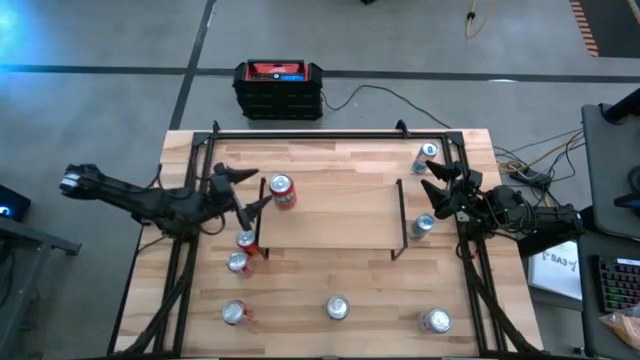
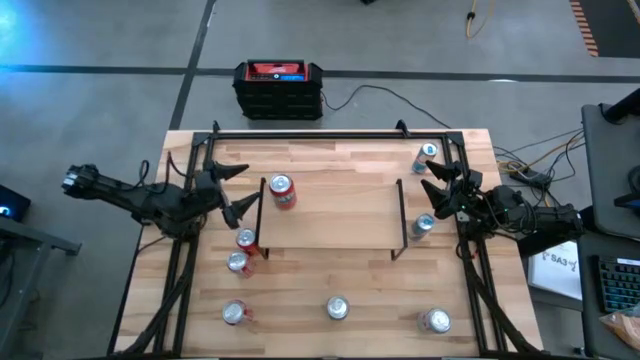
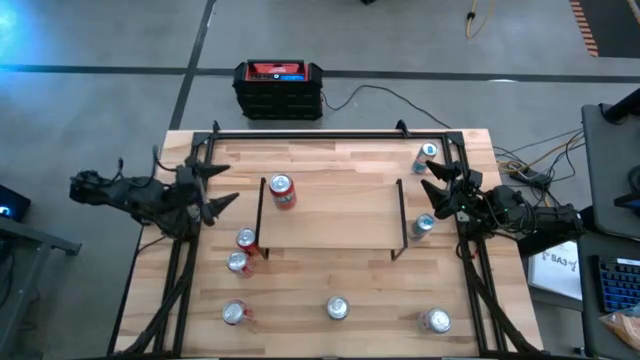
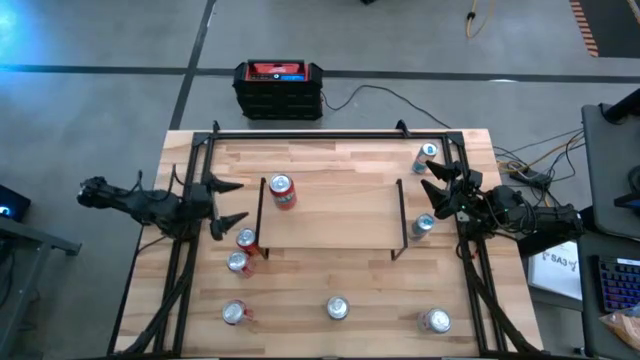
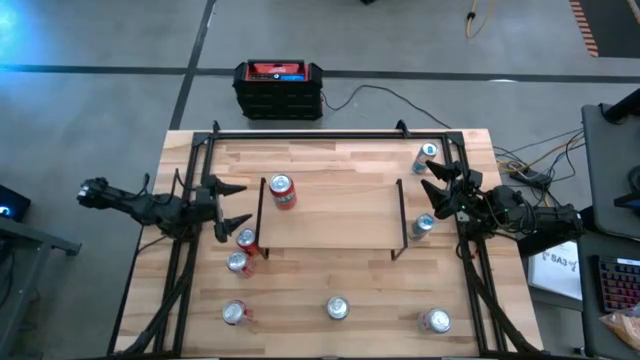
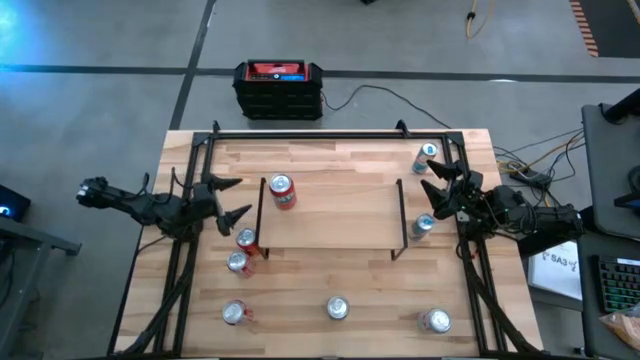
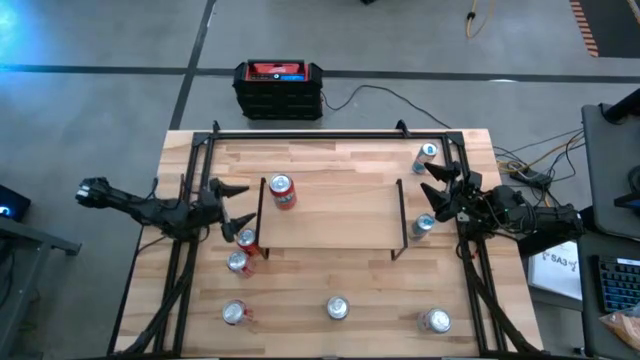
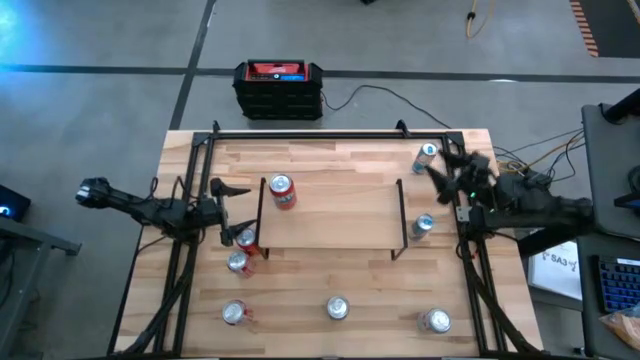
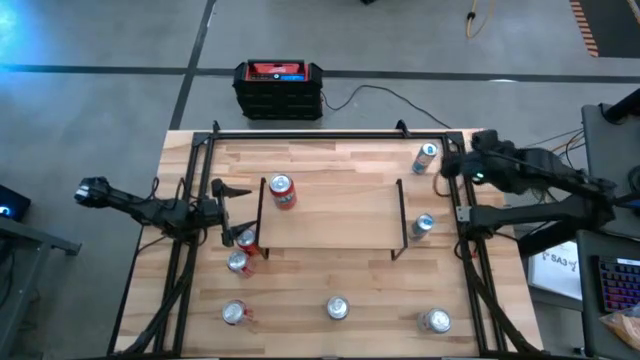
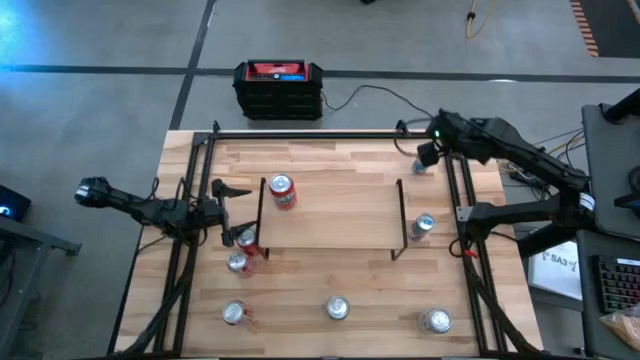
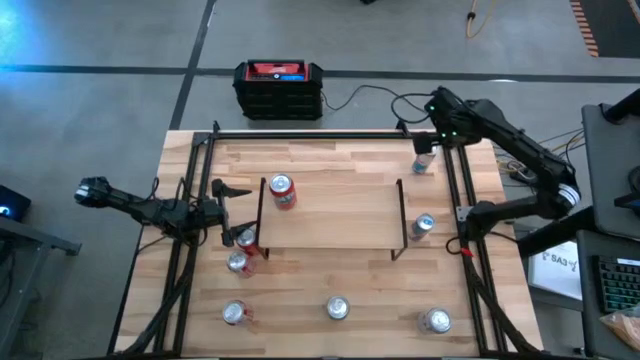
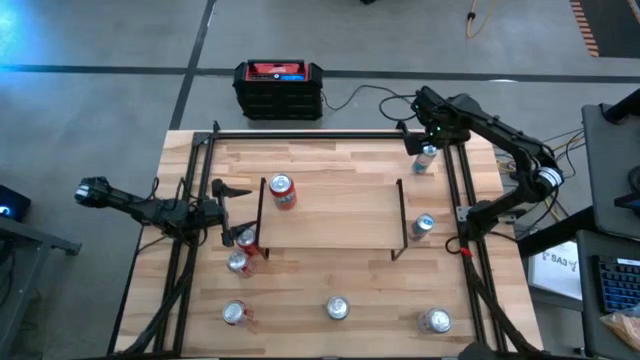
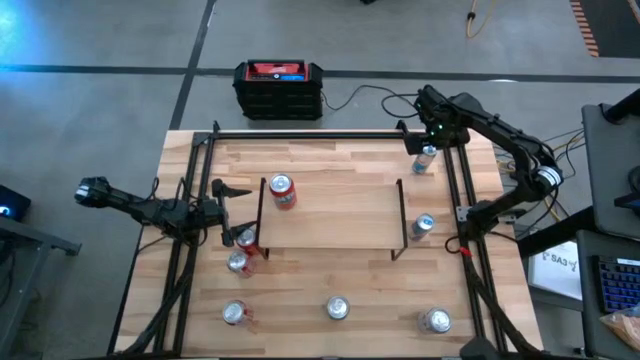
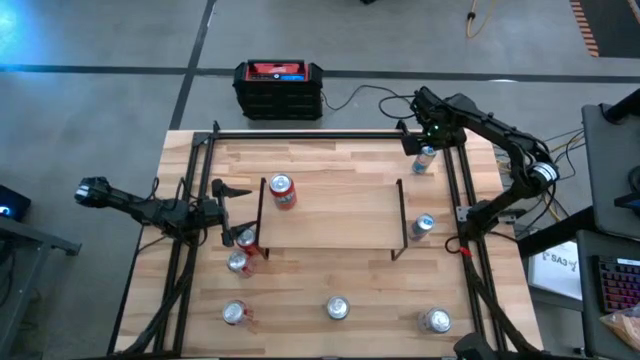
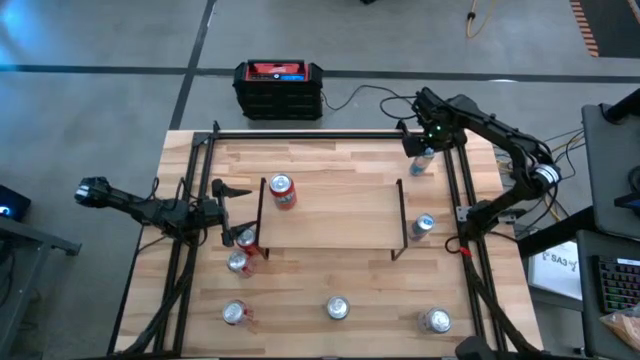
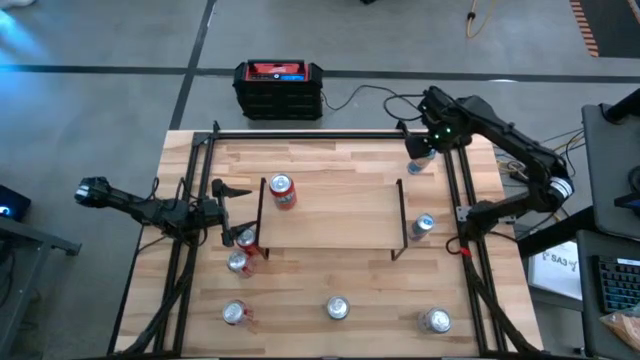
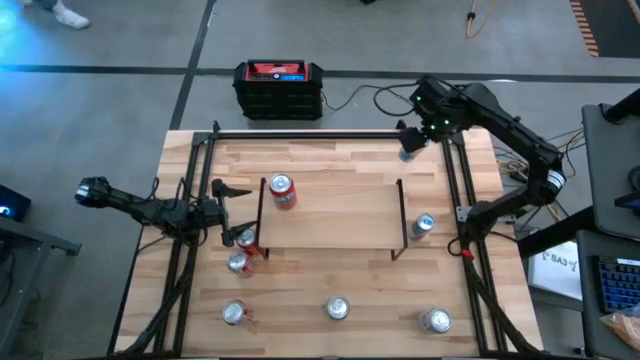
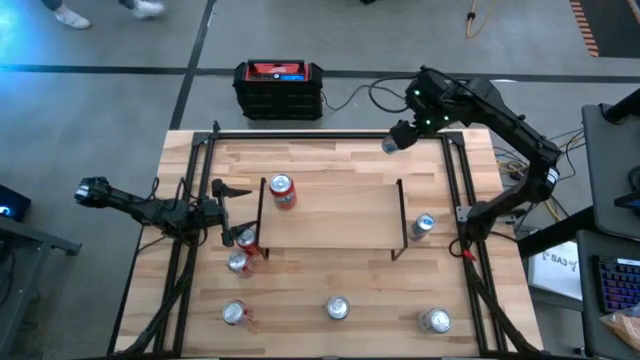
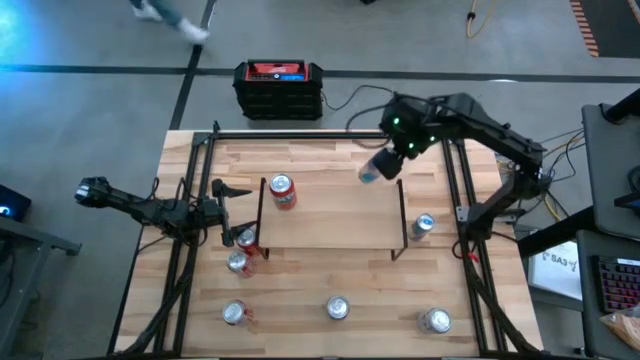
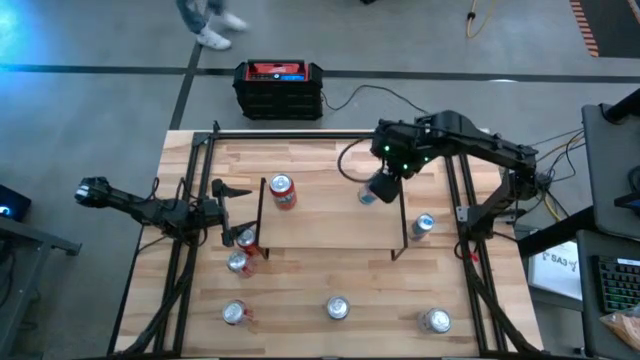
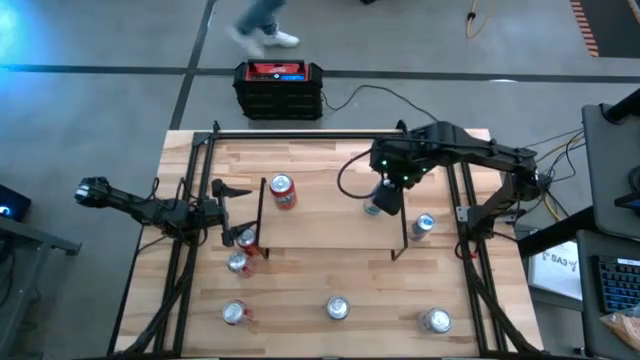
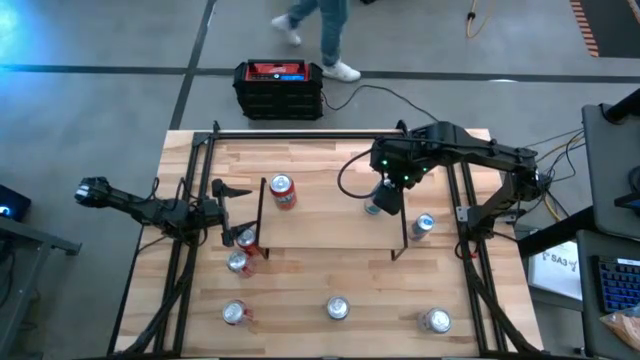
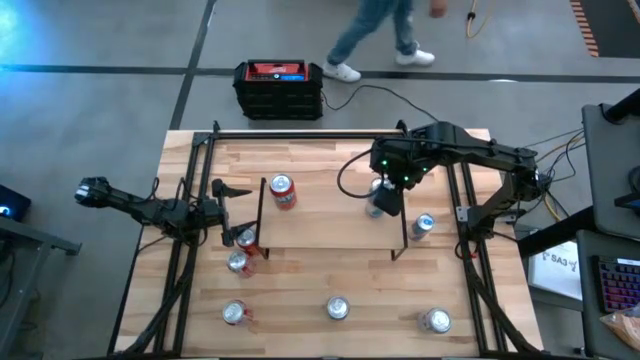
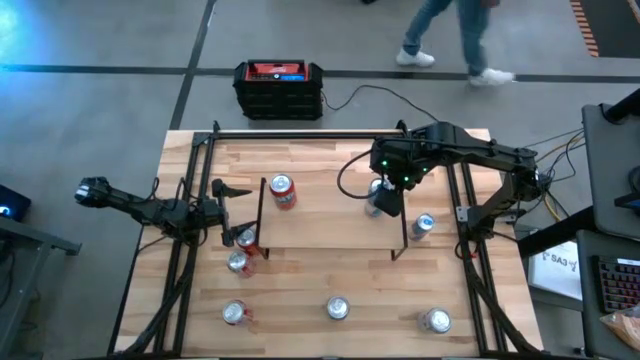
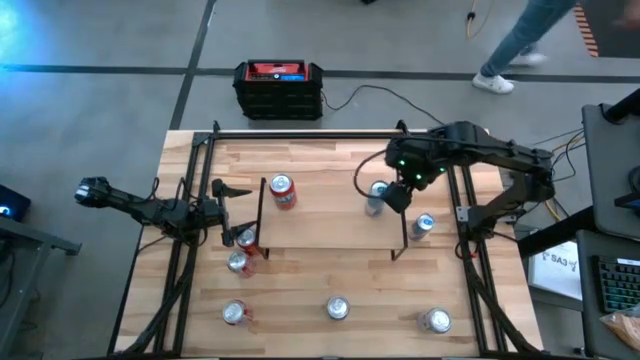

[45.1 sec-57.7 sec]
Task: Place canned beverage on shelf
Put the top blue soda can on the shelf

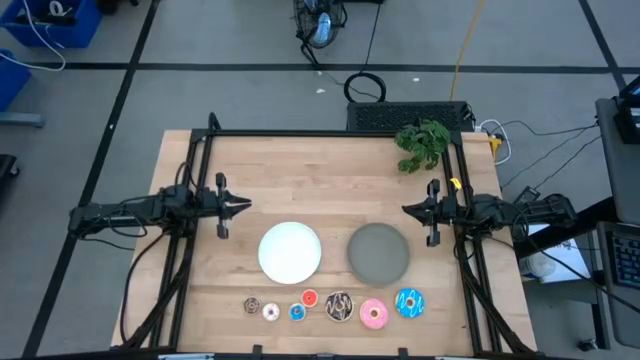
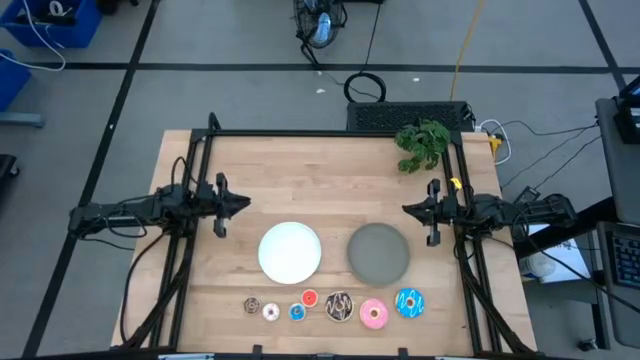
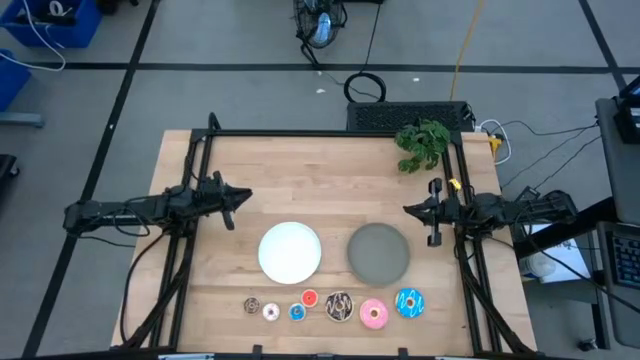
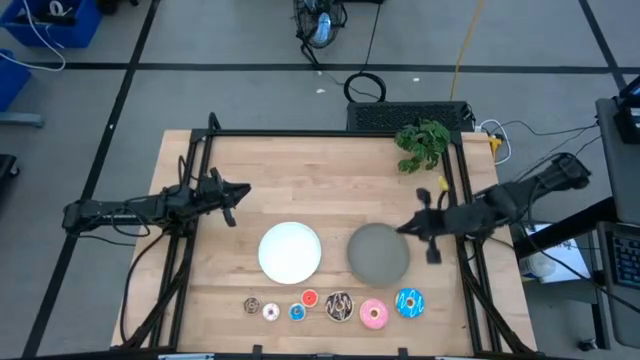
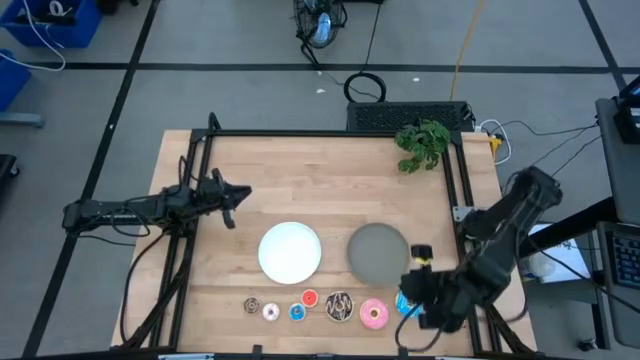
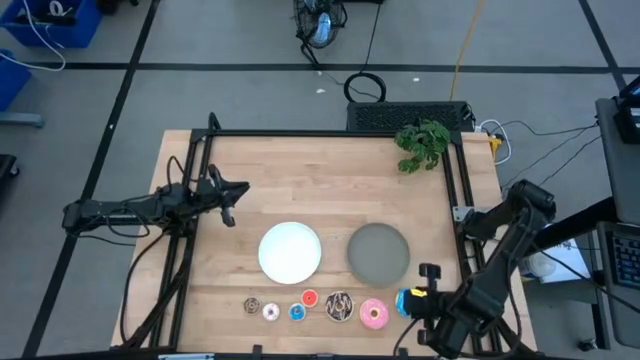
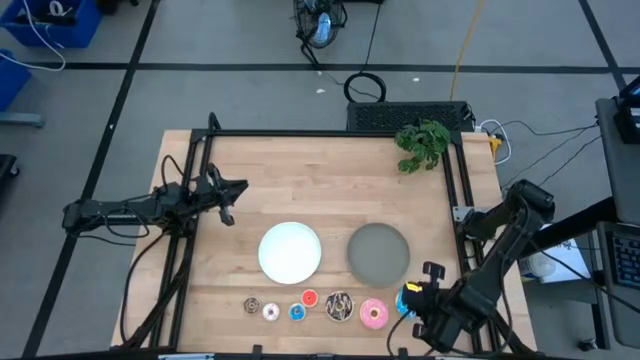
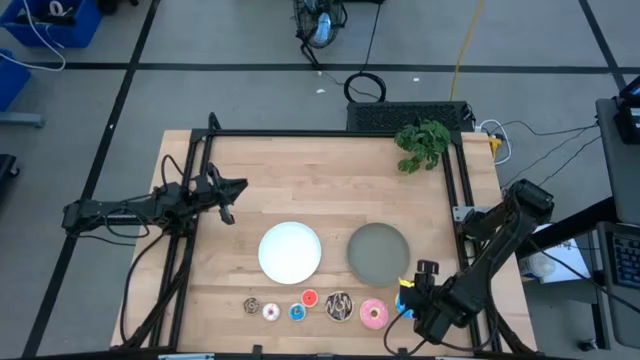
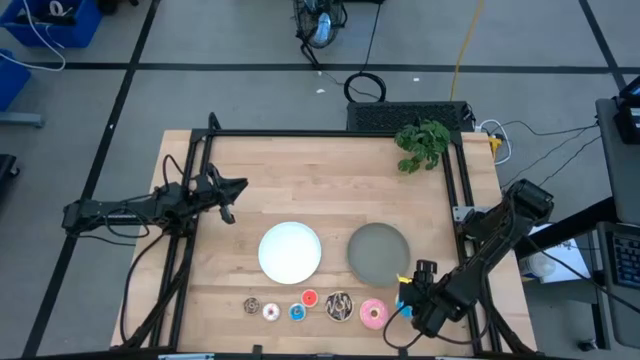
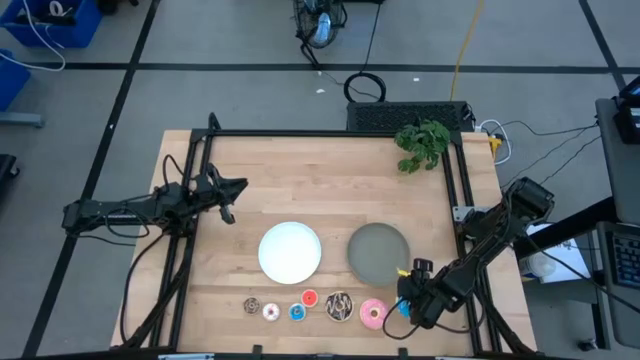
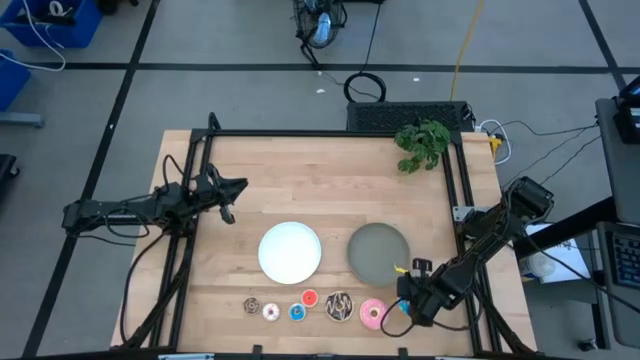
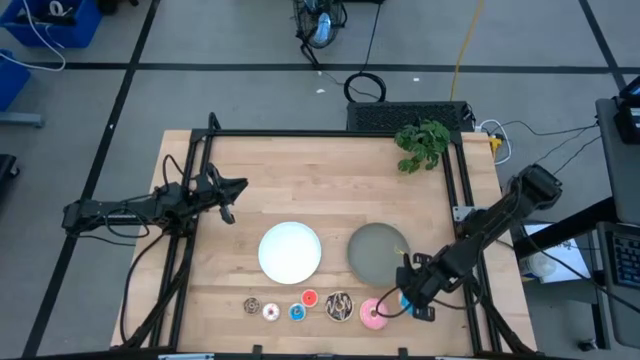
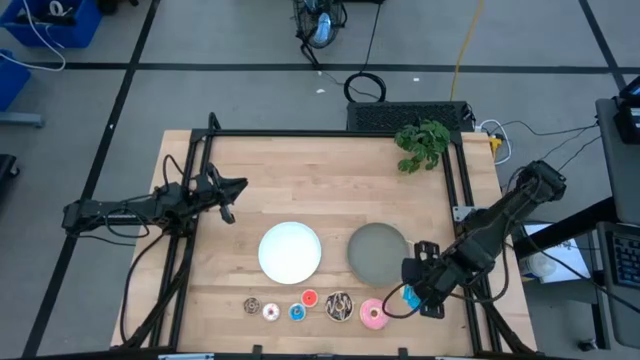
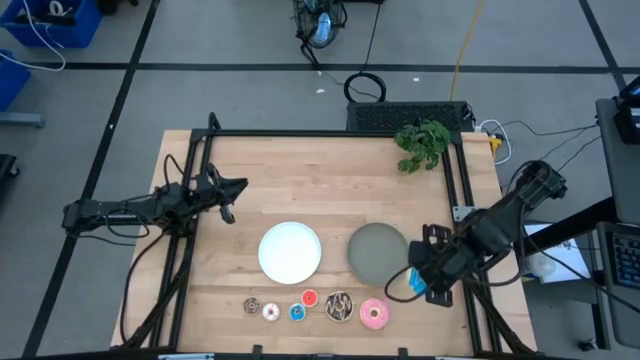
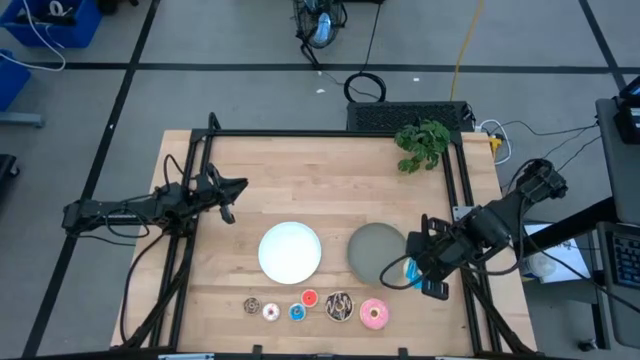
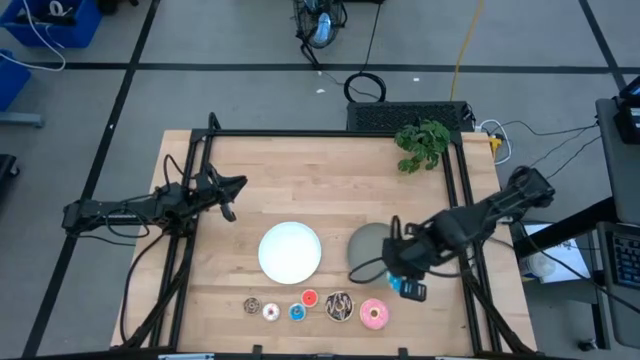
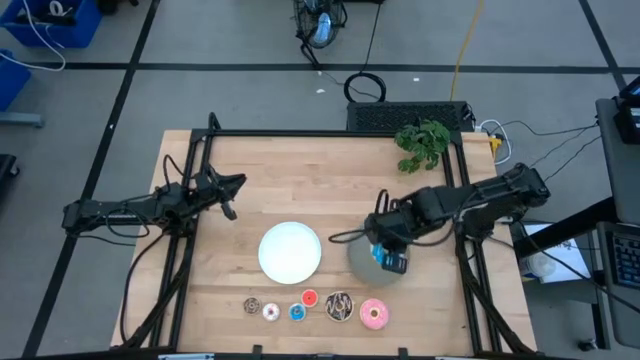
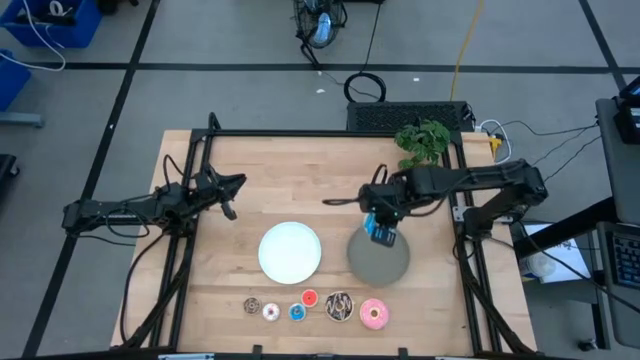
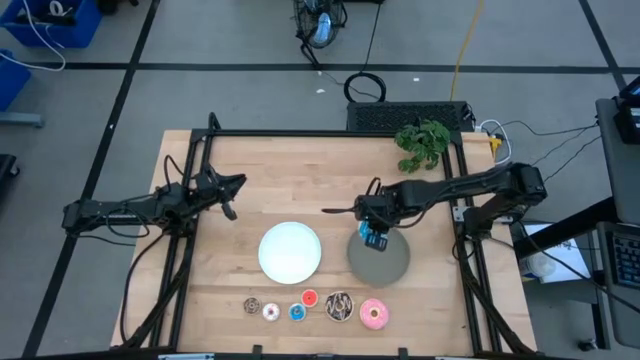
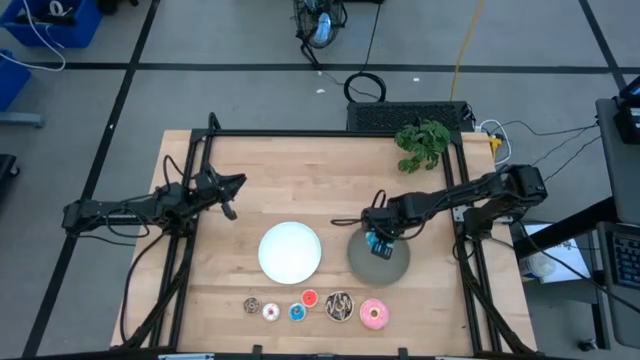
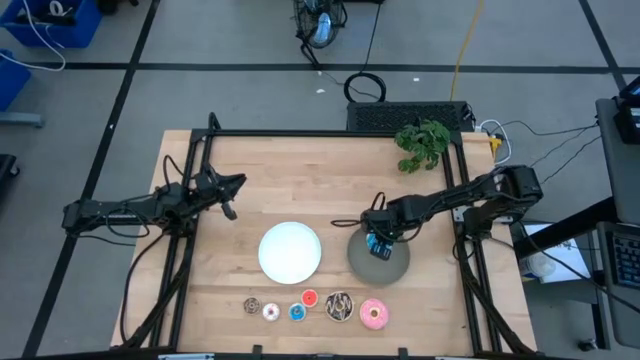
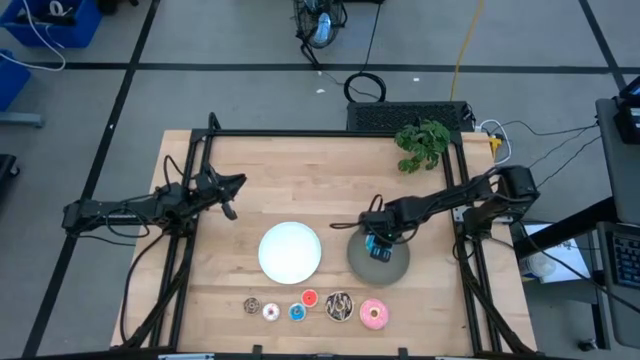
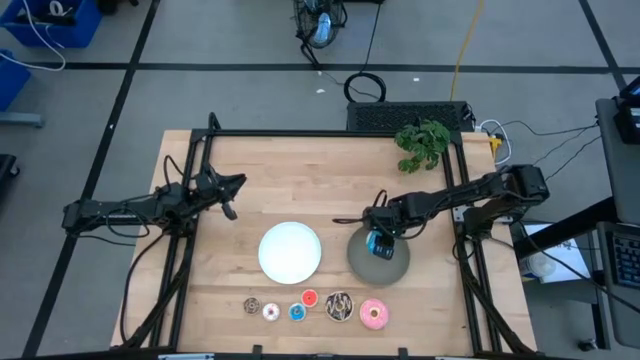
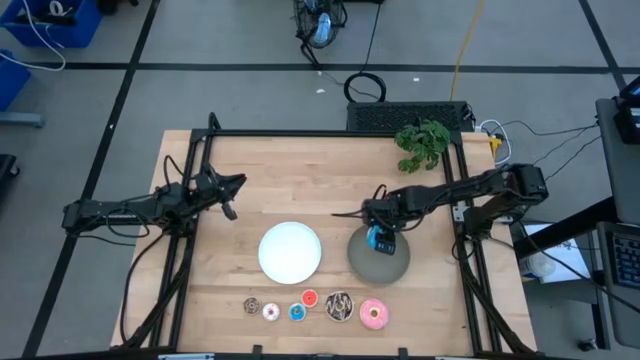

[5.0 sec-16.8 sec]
Task: Pick & Place donuts
Put the large blue donut on the brown plate
